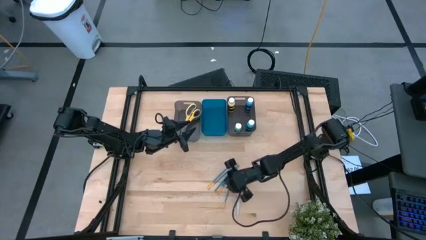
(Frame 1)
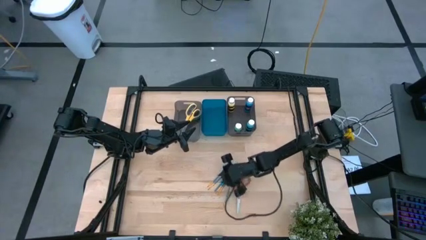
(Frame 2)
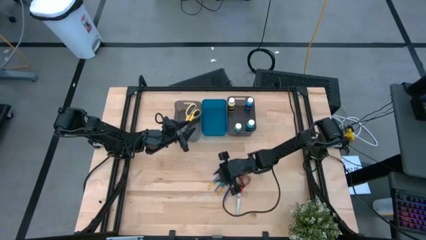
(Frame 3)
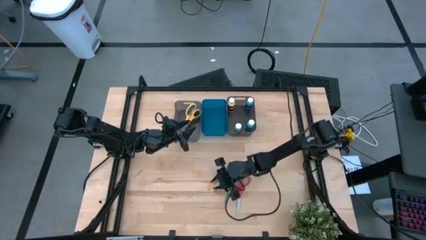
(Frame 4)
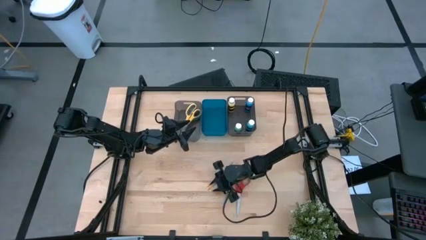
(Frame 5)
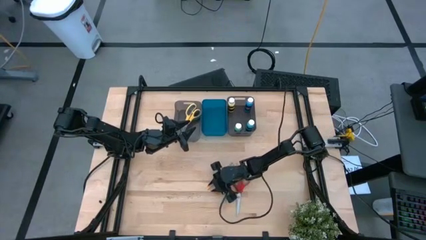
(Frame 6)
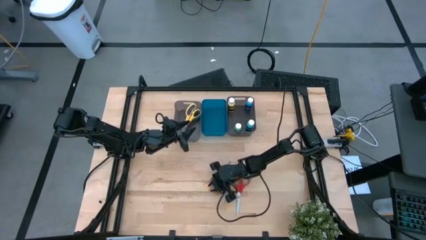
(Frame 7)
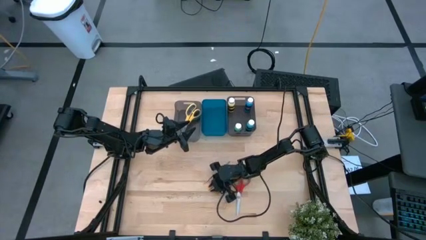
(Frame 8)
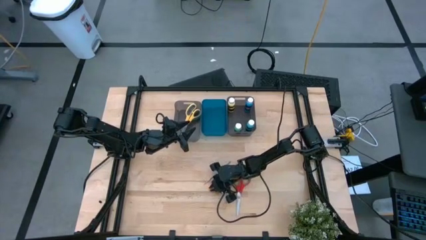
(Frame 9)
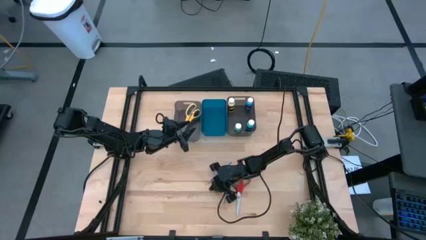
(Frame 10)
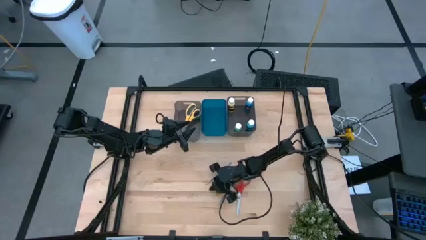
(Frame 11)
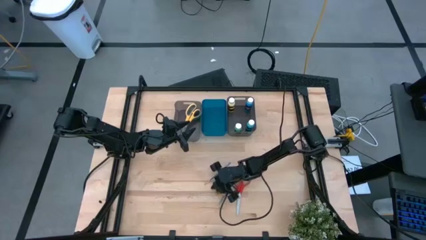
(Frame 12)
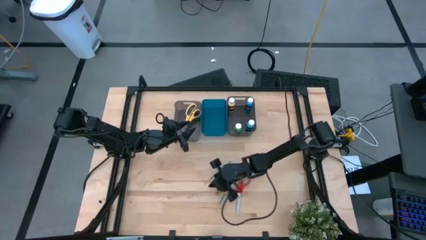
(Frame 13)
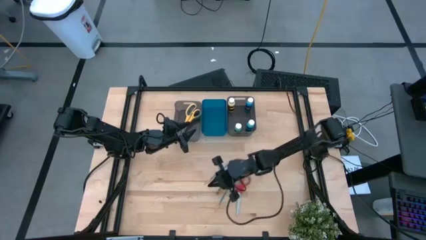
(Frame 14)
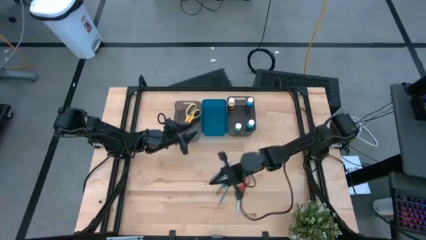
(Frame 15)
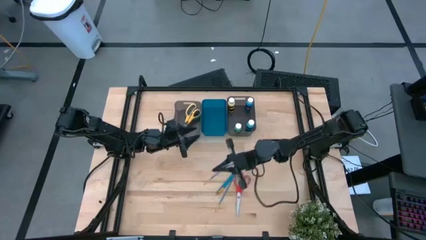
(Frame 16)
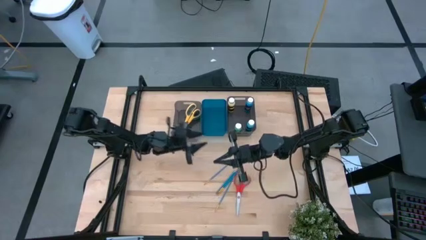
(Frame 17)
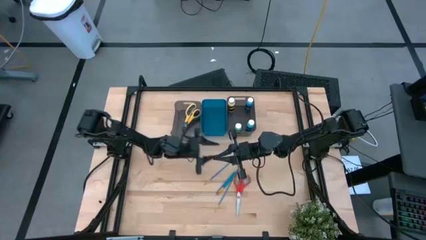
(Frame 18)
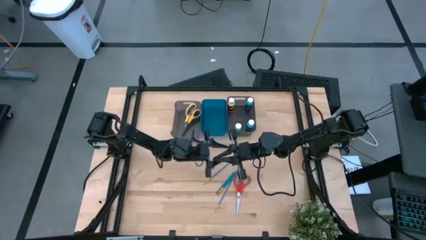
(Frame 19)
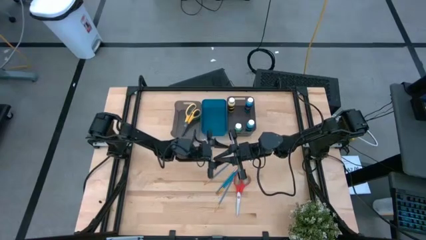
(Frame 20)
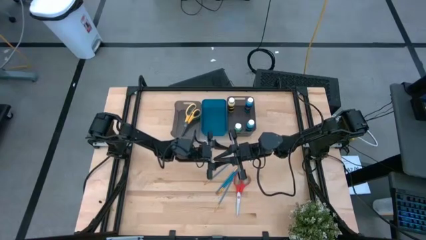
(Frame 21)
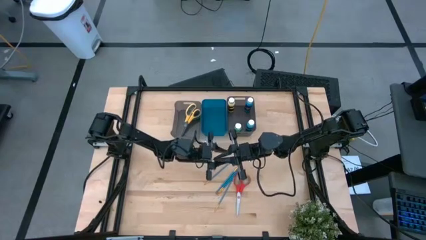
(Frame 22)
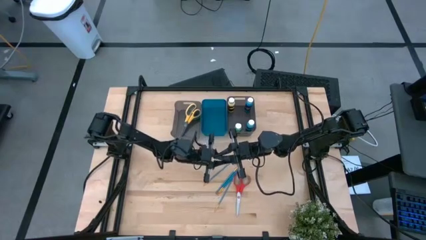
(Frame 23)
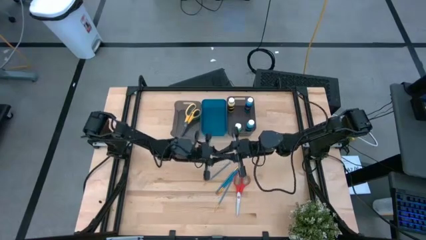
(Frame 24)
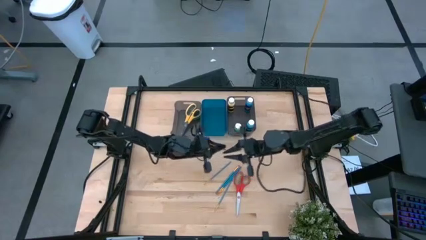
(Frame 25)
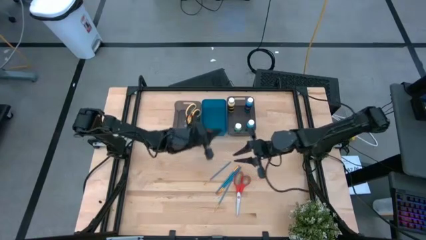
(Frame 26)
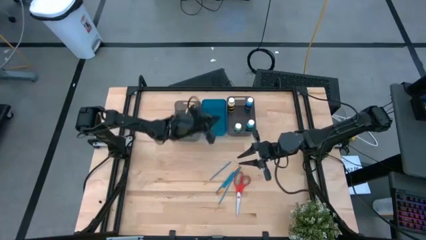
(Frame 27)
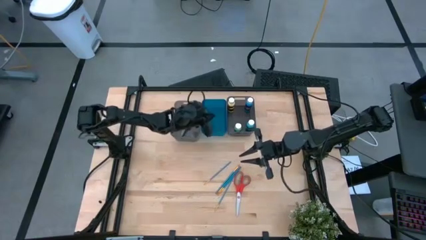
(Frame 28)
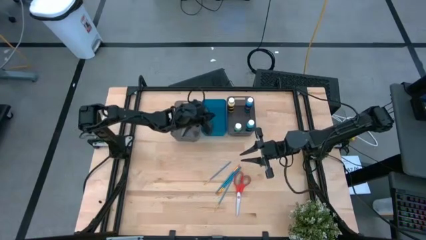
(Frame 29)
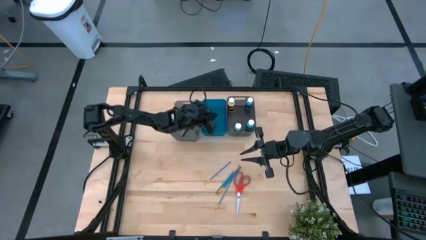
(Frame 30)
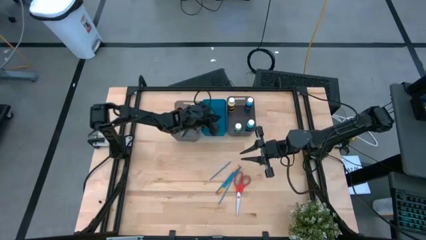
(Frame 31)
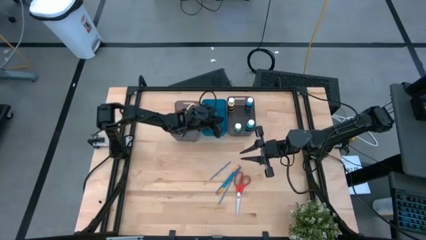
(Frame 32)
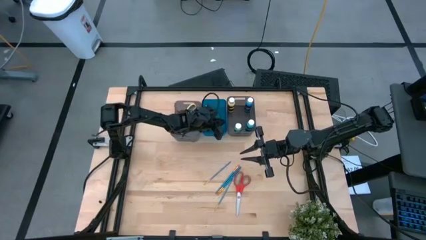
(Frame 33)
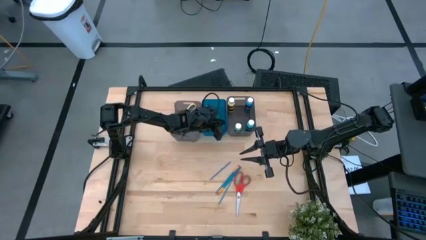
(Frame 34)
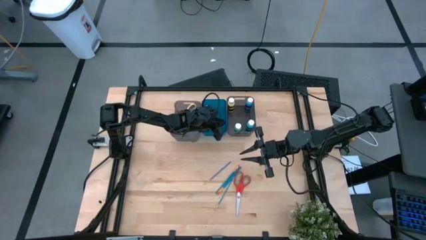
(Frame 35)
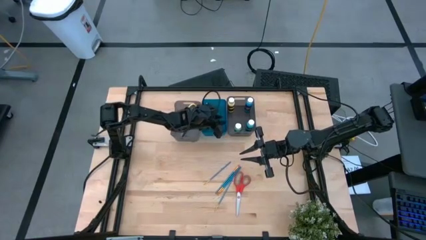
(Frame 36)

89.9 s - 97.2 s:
Task: Pick & Place Paint Supplies
Put the blue paint brush into the blue bin

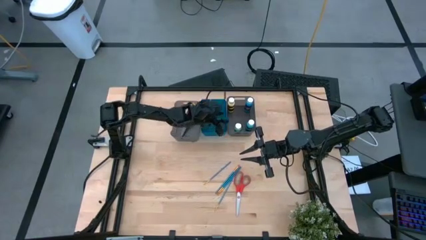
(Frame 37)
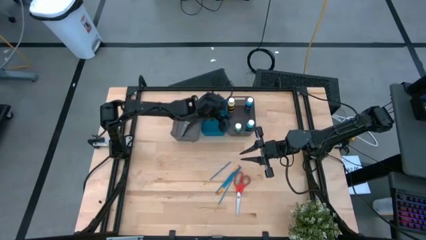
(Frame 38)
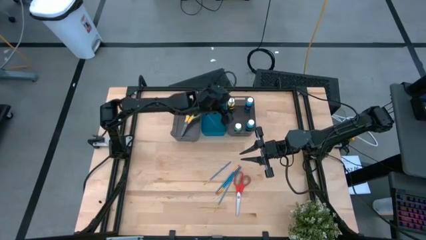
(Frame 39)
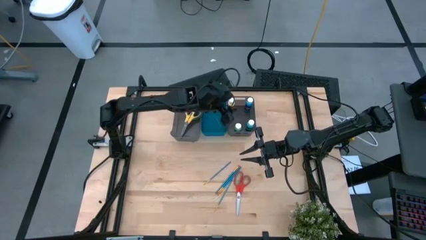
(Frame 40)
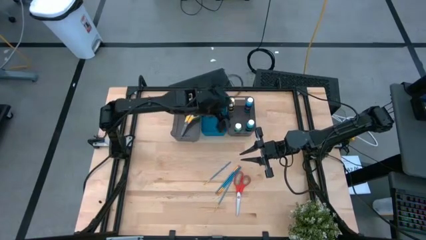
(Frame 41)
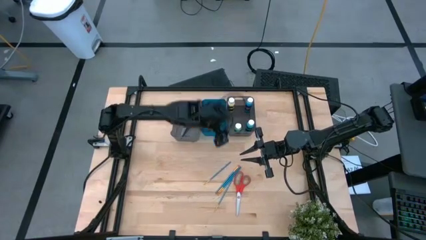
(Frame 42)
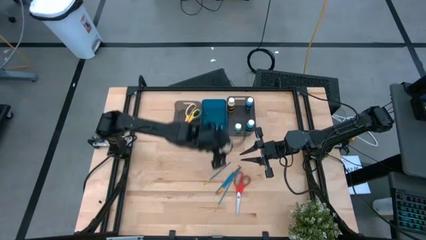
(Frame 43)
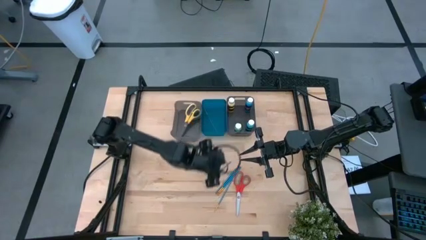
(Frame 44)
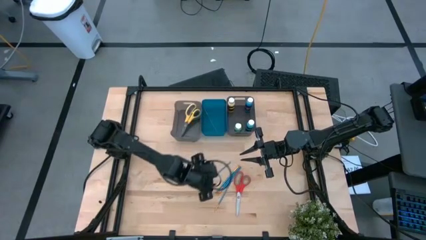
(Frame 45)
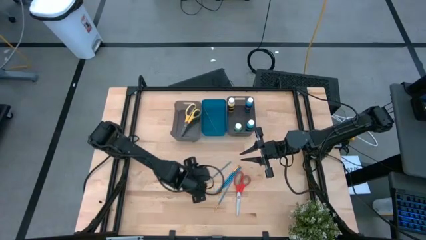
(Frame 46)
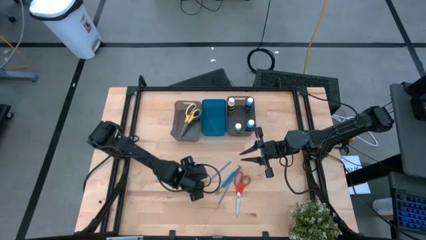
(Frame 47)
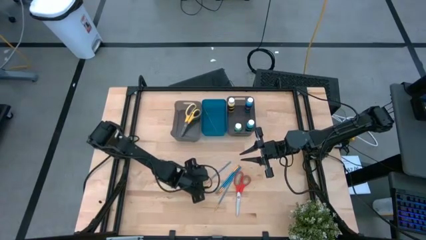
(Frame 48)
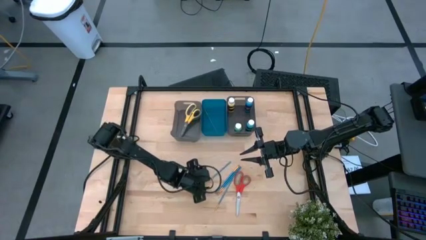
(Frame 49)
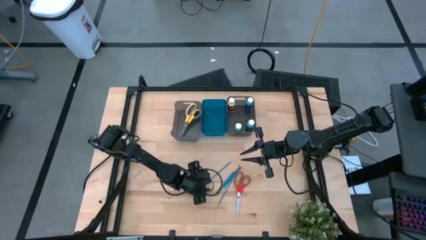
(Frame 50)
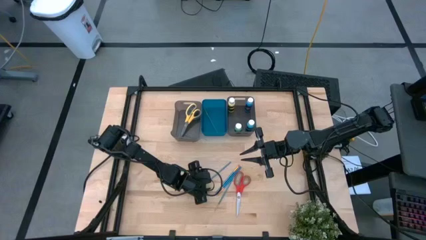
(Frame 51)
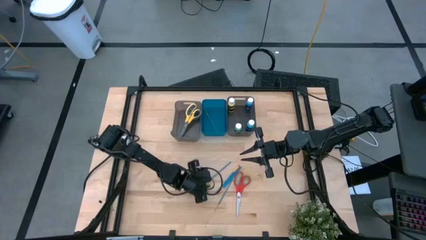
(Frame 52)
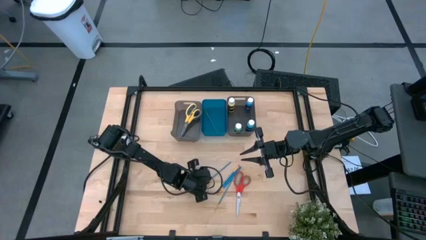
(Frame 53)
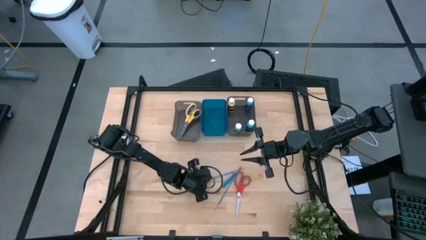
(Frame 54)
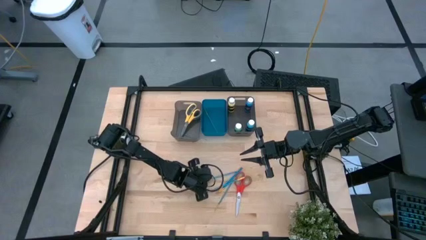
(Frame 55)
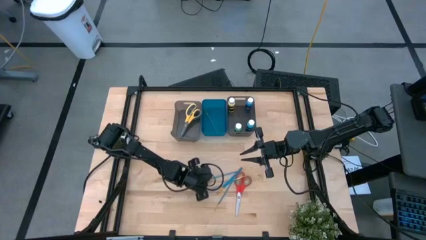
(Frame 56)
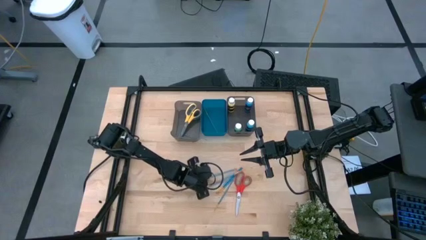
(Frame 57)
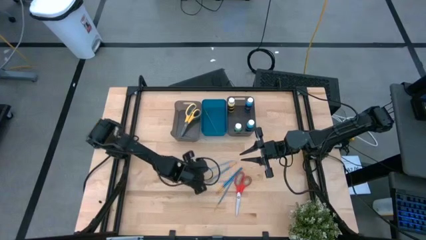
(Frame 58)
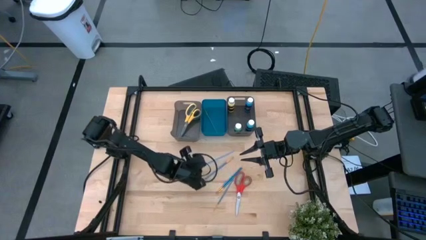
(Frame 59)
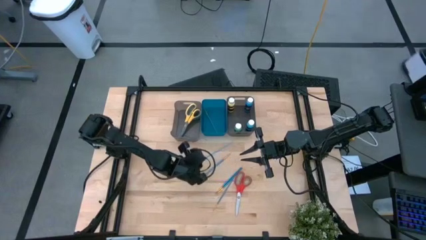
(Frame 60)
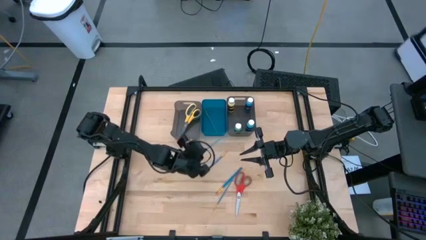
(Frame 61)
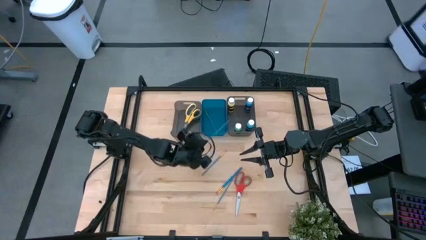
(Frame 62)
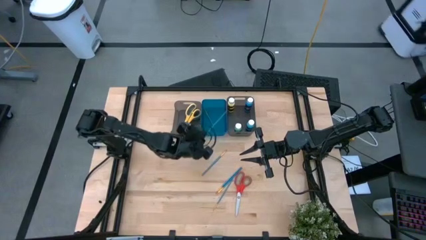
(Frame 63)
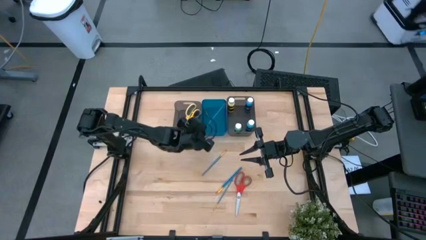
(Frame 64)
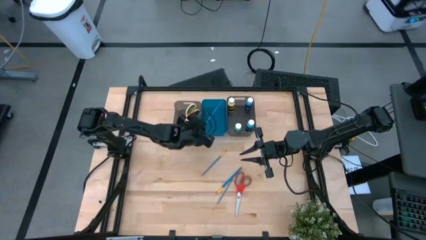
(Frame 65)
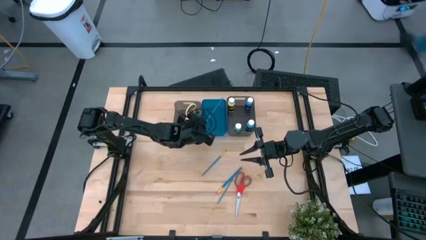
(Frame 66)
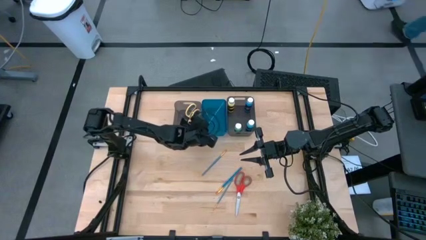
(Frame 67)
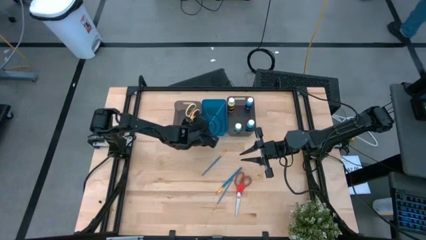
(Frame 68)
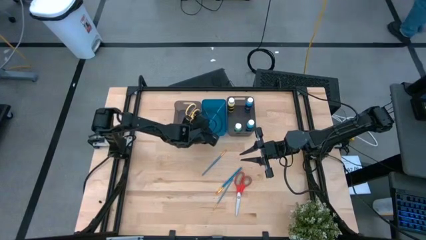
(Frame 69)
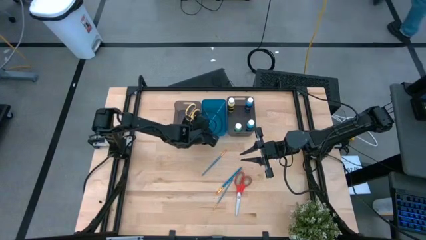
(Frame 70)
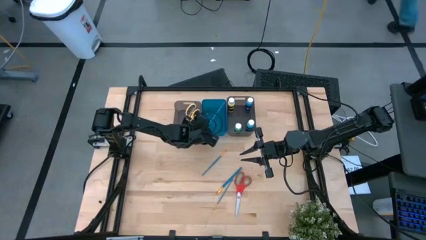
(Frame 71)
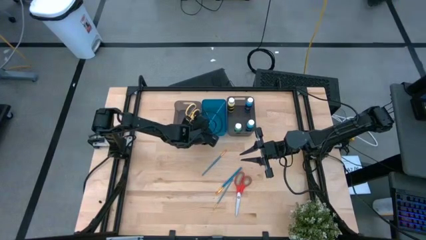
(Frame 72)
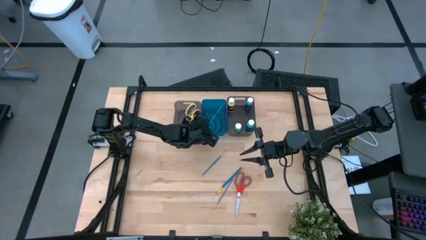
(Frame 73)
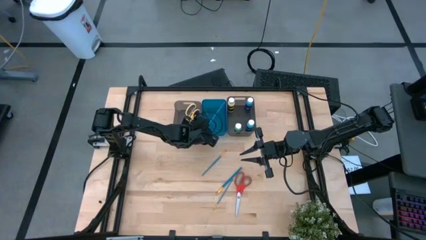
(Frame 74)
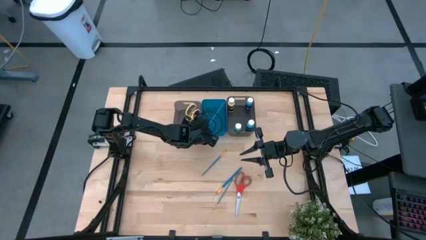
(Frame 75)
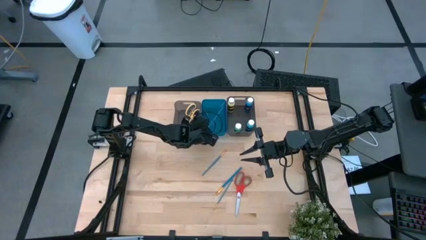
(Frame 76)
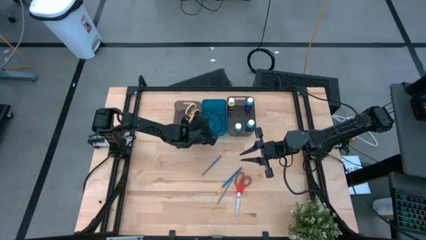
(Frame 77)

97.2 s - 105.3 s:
Put the blue paint brush into the blue bin

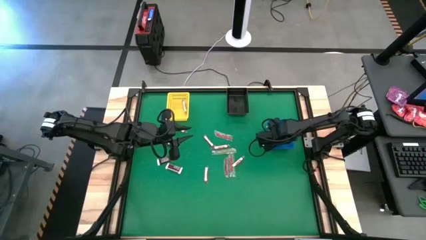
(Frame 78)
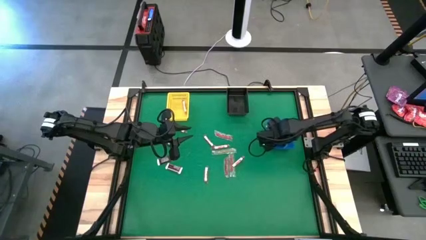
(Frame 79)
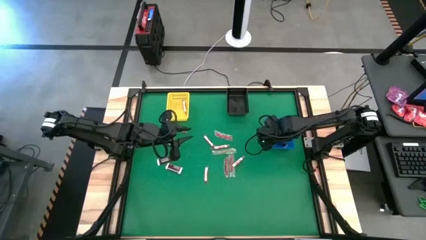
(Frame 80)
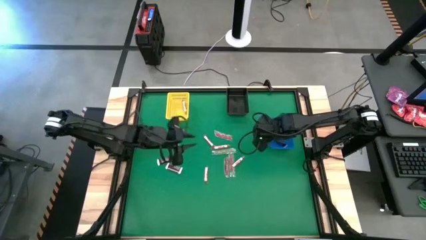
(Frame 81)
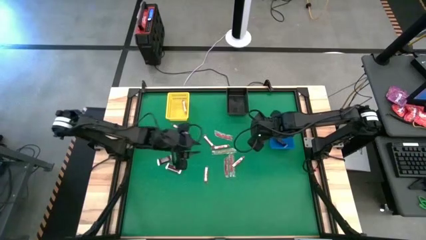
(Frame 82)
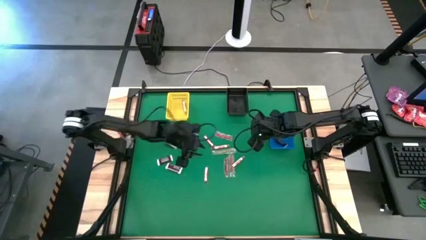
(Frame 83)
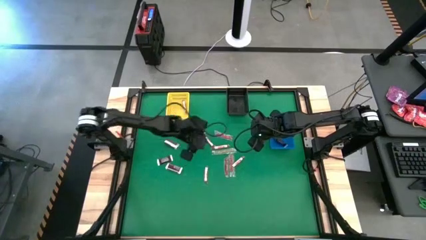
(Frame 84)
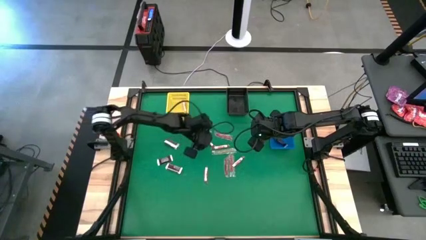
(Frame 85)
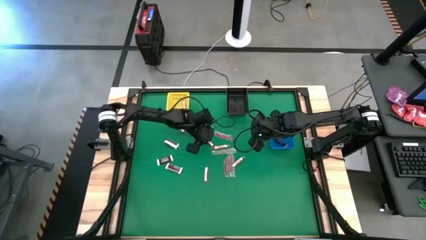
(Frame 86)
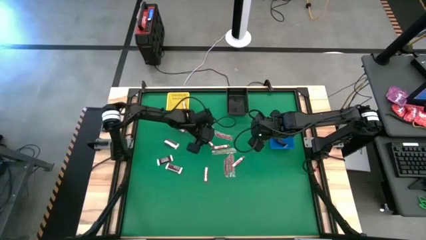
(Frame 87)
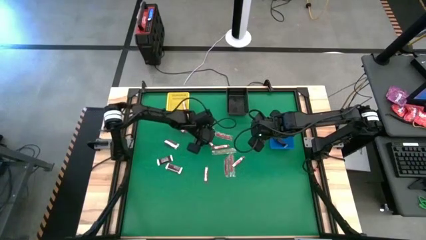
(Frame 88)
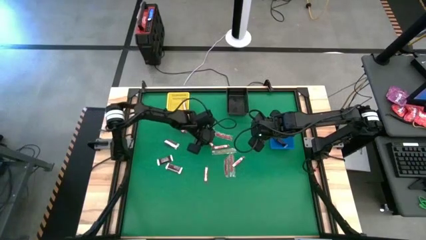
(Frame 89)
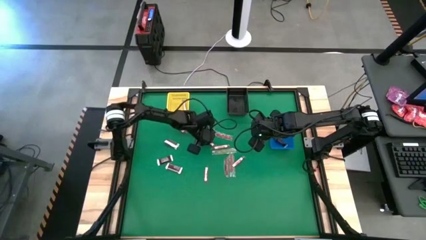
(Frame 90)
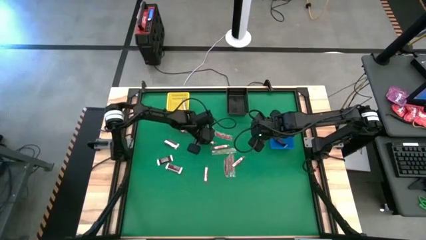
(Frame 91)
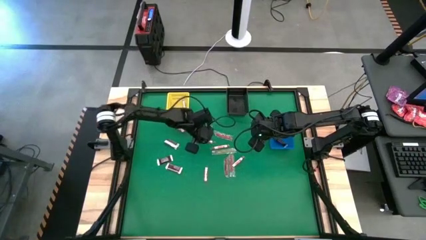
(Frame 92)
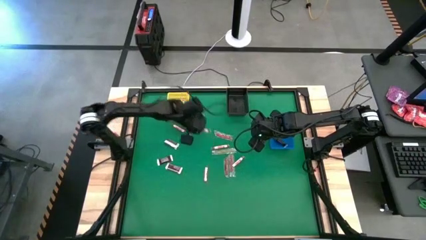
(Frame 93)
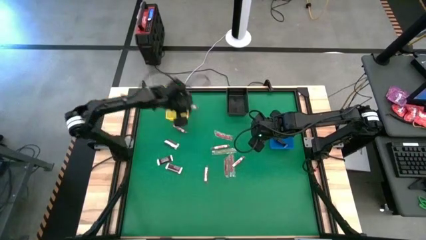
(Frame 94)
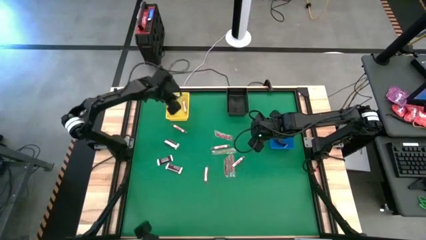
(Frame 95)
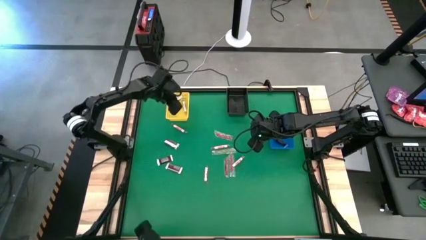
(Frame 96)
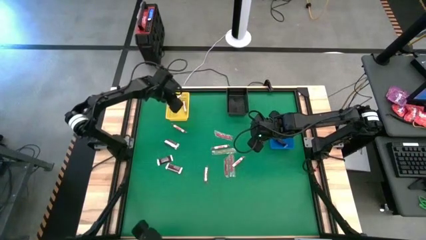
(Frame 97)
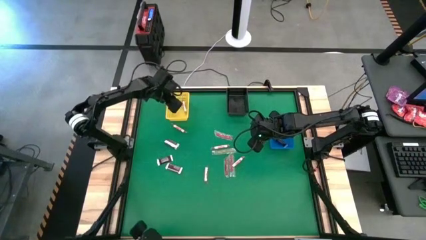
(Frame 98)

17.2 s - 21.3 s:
Task: Sort candy by brand, put in halloween buckets
Put the pink candy into the yellow basket
